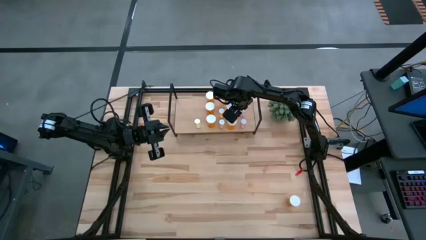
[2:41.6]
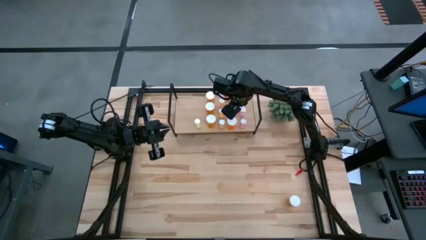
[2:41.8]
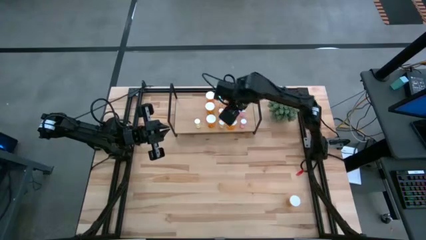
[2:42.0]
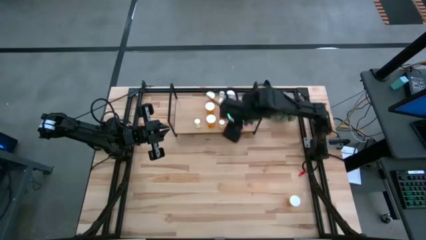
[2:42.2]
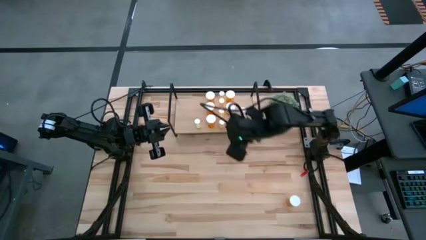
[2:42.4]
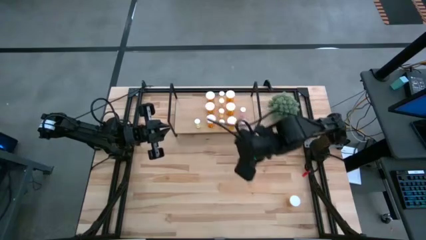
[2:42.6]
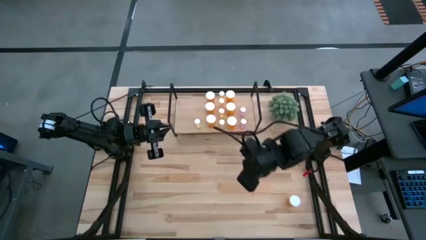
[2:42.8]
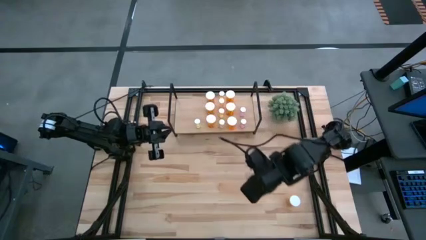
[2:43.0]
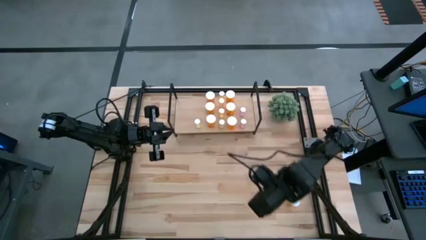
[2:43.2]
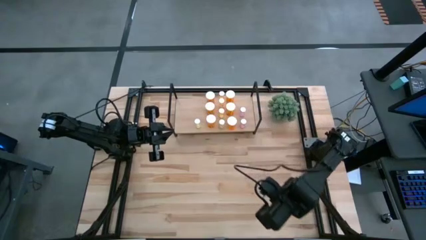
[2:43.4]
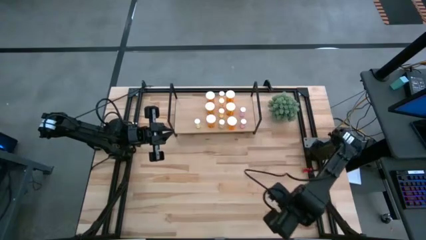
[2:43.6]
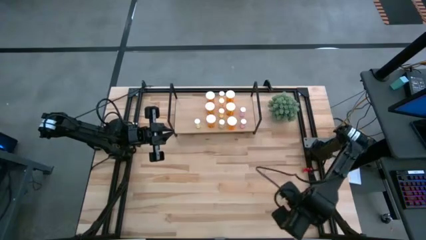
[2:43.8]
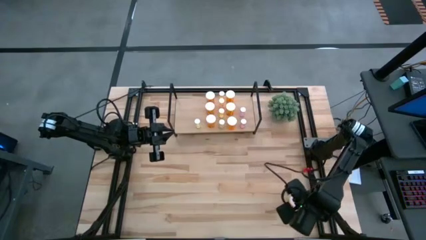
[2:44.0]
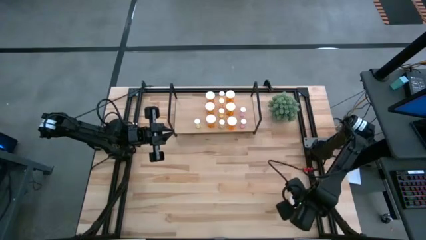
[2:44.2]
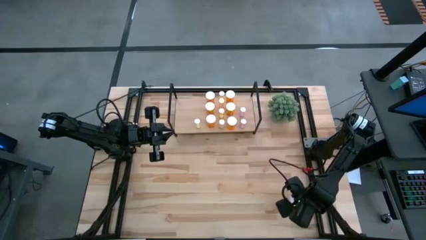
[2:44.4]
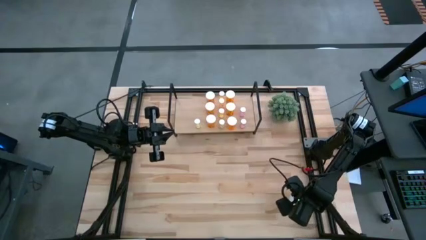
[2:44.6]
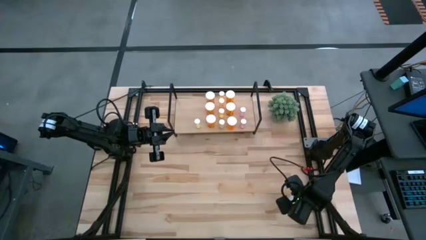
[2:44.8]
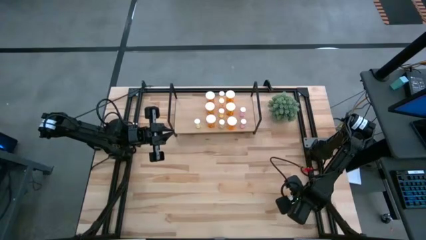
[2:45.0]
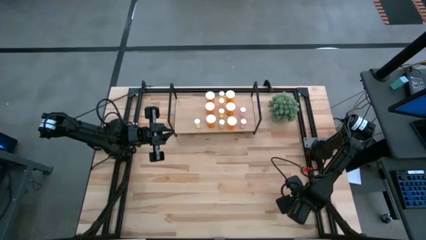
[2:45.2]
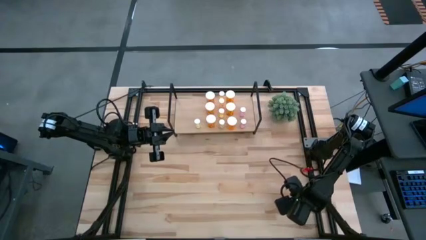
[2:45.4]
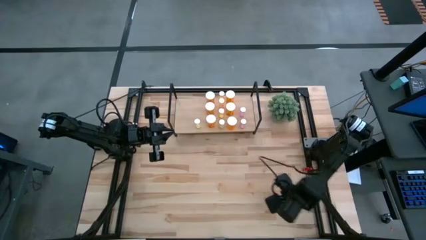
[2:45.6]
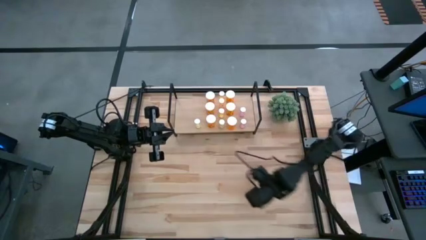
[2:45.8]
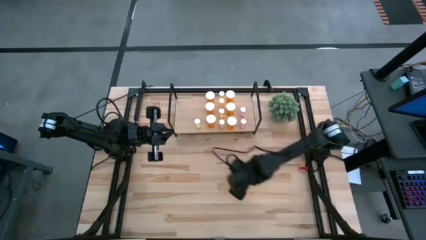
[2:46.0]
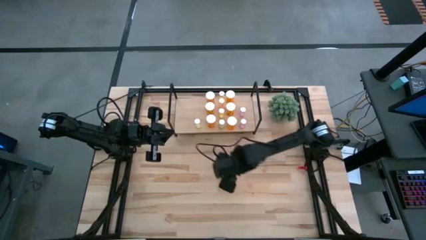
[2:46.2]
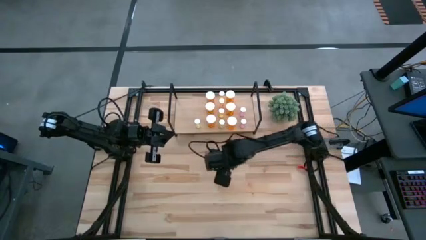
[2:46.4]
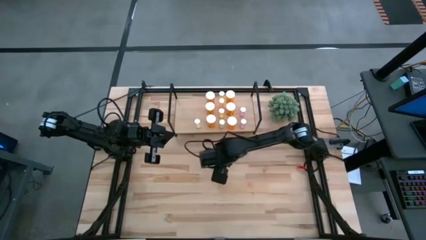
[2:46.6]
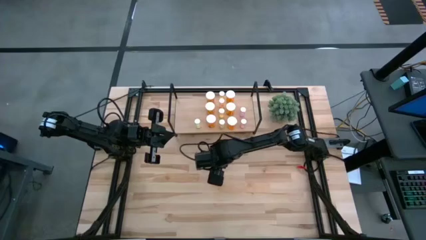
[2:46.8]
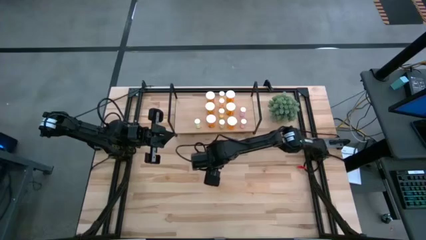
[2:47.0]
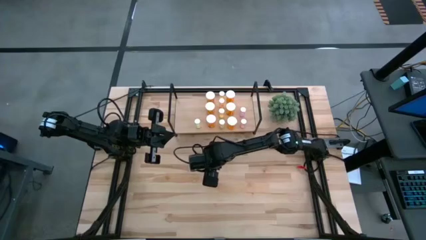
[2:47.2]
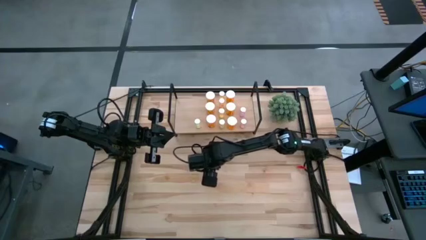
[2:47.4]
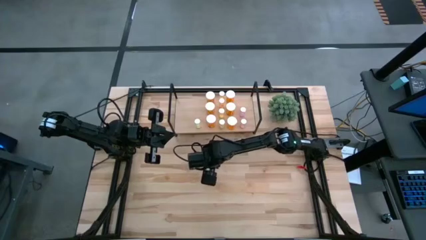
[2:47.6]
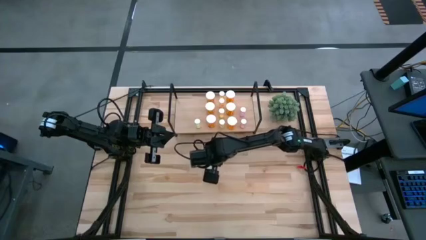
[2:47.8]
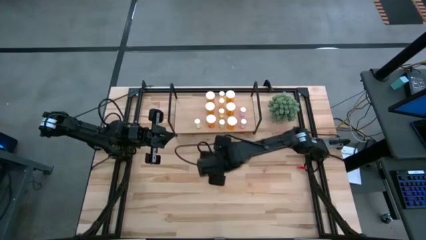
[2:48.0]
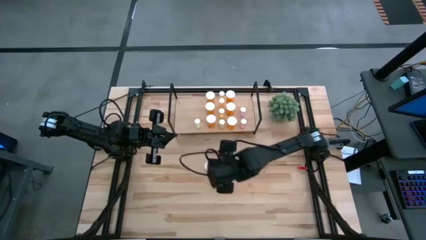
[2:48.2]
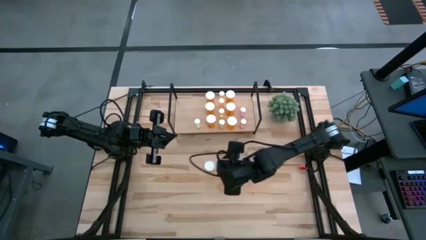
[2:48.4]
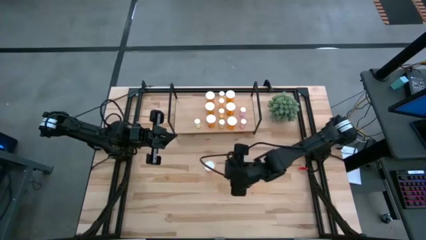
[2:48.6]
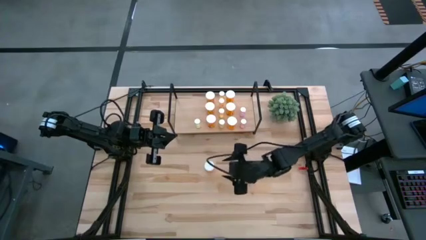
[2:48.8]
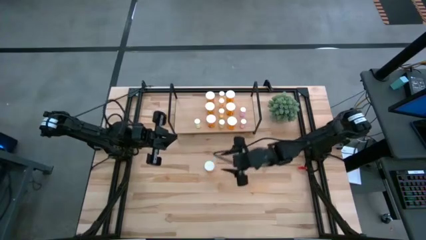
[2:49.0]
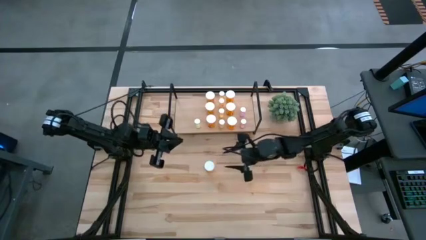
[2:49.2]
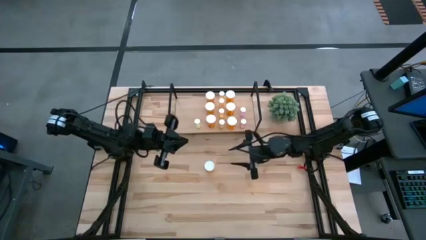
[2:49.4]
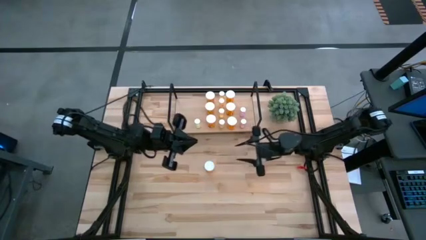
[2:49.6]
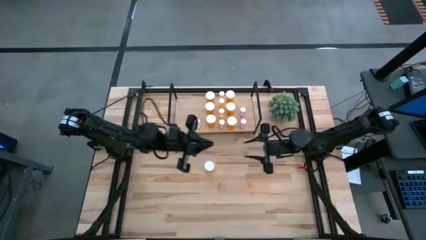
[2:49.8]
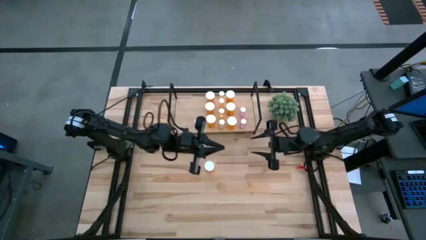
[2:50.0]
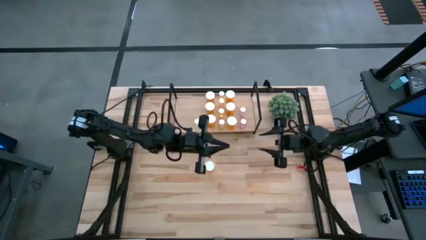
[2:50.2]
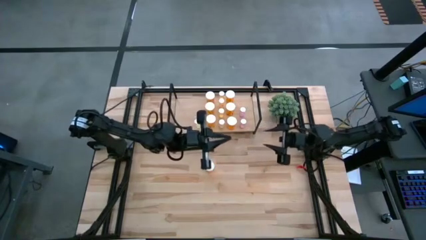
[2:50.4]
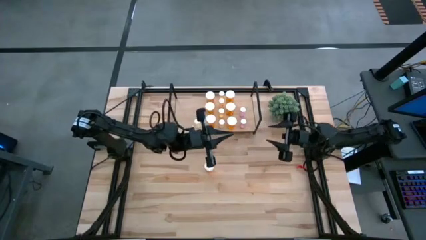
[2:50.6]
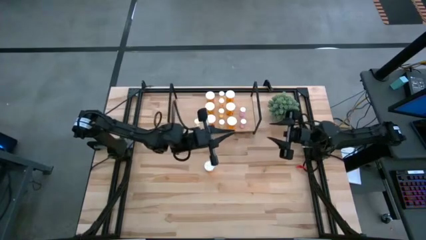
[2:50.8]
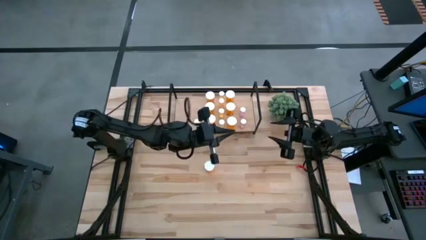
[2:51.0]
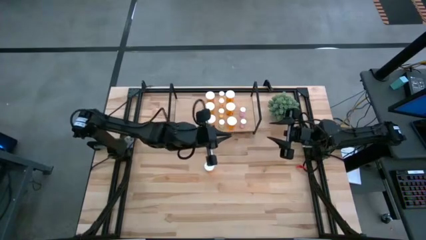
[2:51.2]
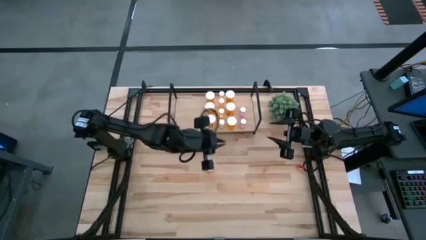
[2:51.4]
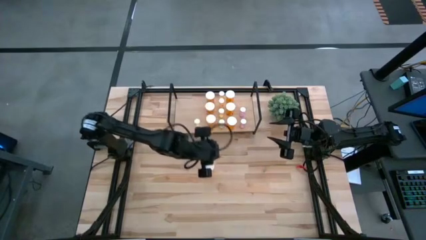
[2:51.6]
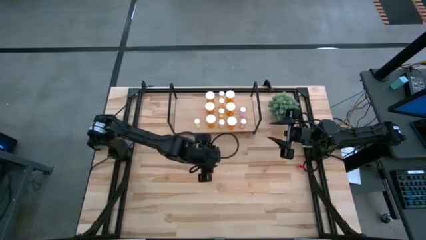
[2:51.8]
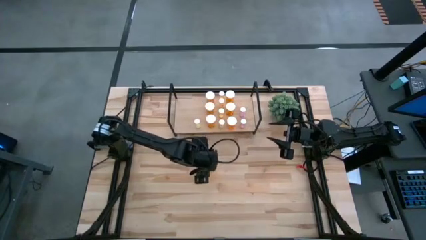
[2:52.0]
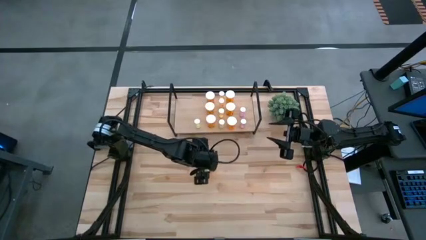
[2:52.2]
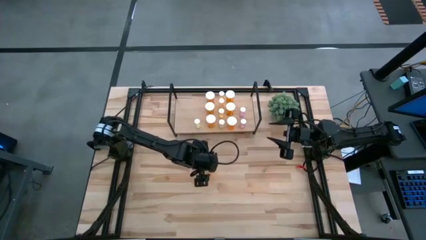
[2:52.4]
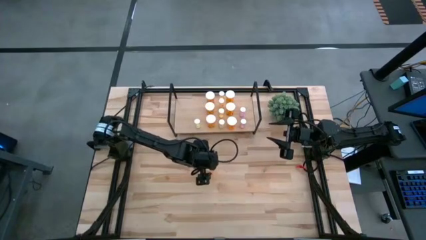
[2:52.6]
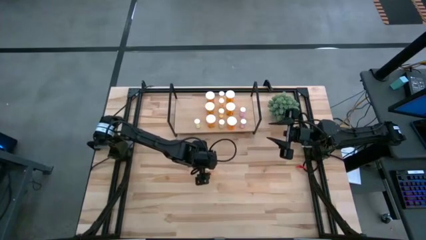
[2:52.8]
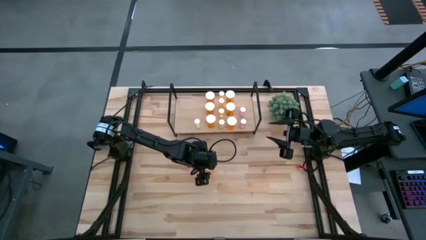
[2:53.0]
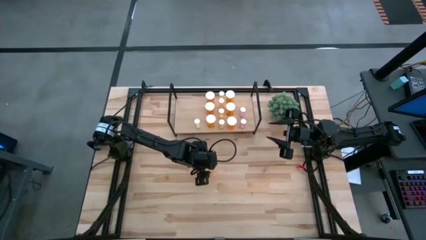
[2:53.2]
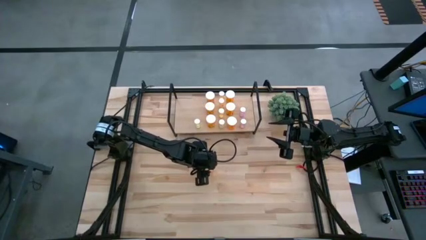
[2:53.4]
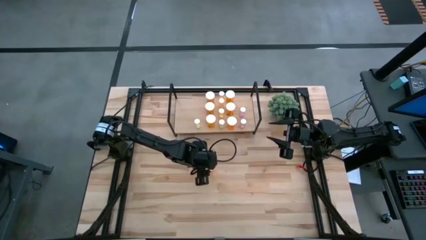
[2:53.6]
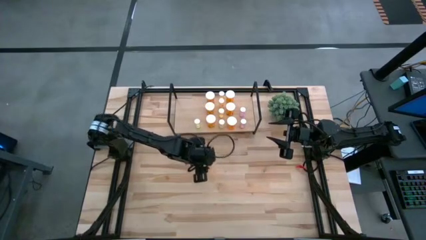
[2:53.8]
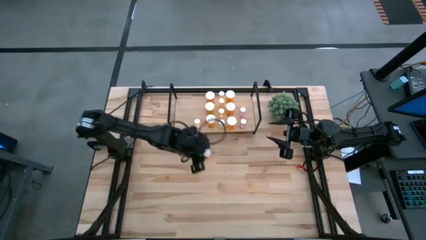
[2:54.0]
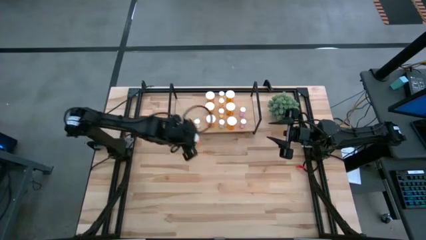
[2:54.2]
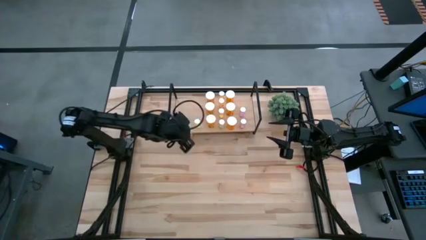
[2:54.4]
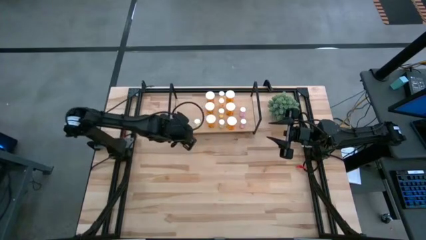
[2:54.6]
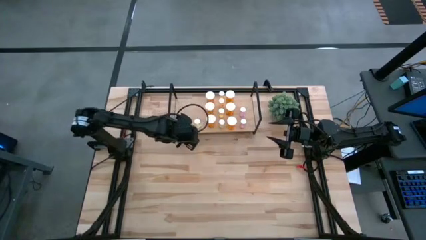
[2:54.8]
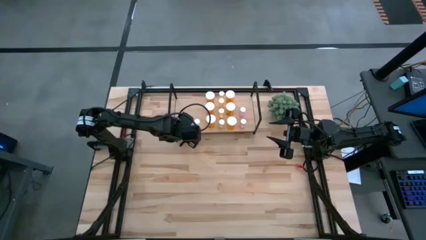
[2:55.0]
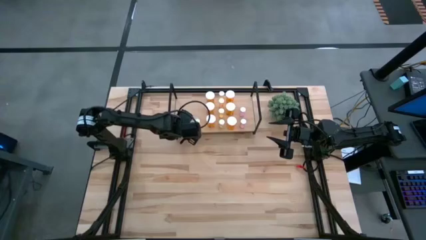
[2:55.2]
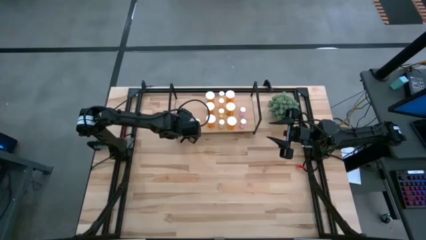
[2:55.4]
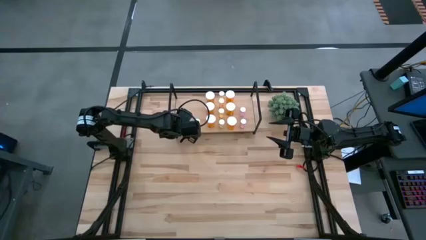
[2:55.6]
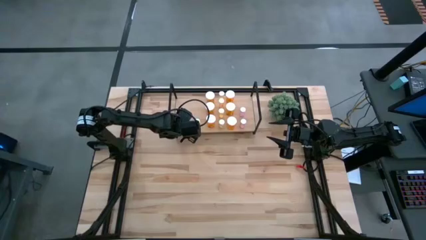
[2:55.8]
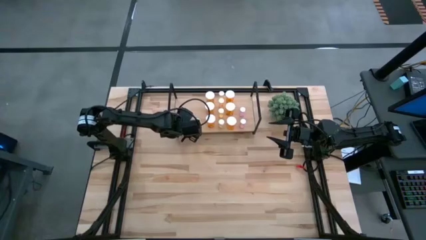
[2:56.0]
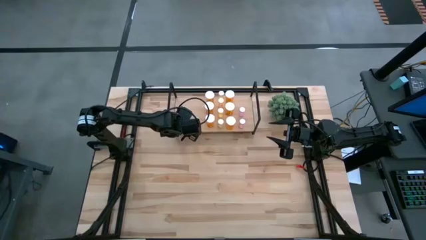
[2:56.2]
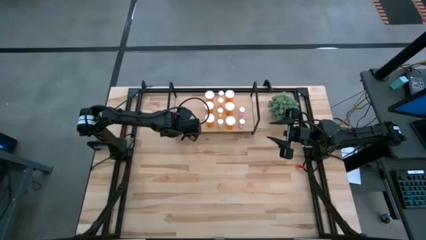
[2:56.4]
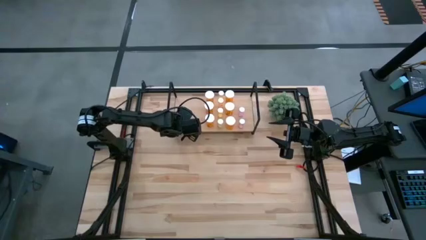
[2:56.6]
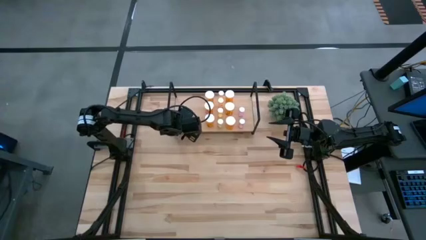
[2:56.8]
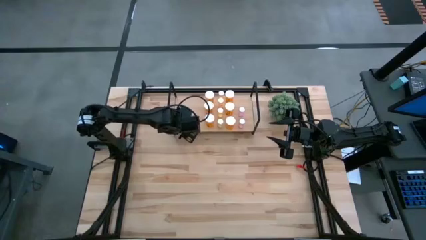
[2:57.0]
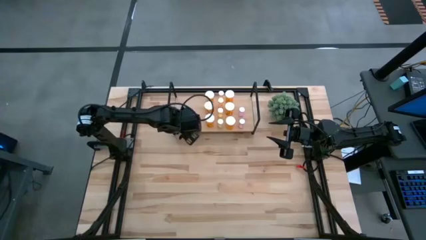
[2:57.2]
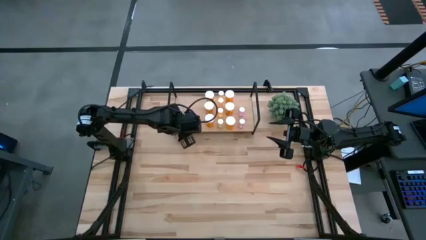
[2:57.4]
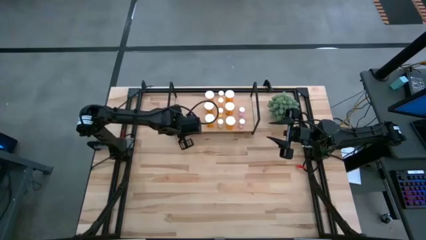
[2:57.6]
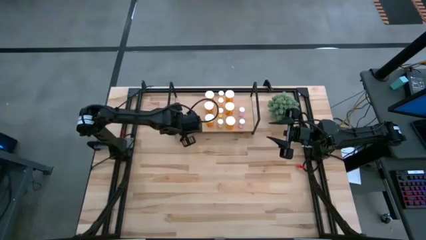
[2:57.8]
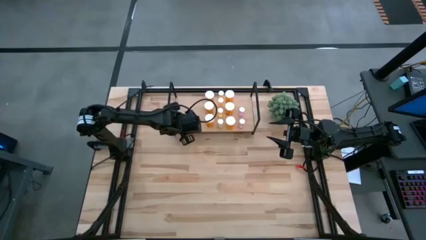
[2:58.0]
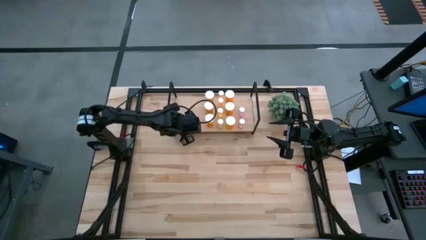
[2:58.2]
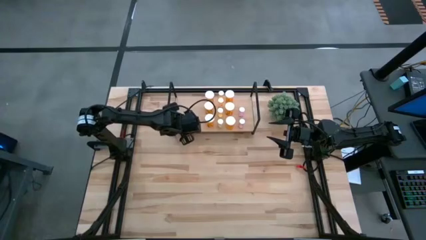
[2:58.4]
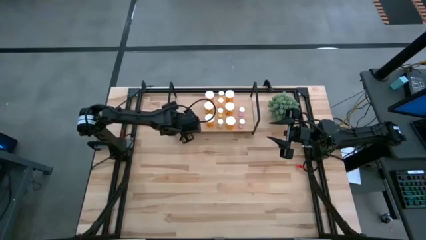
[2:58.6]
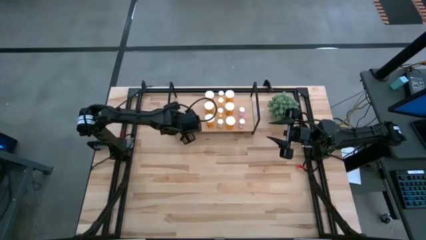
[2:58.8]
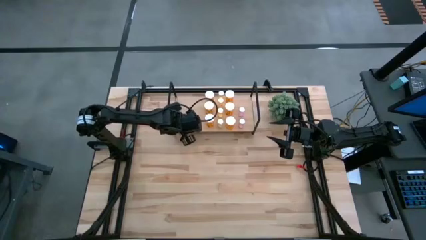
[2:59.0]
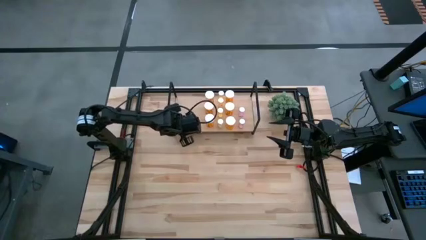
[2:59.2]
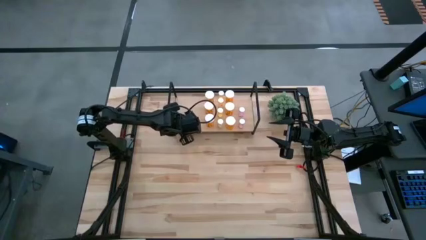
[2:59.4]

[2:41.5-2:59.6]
Task: Pick and place medicine bottles onto shelf by color
Put the large orange pill bottle on the shelf
